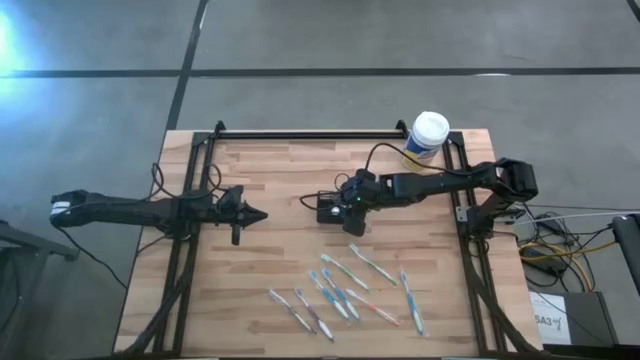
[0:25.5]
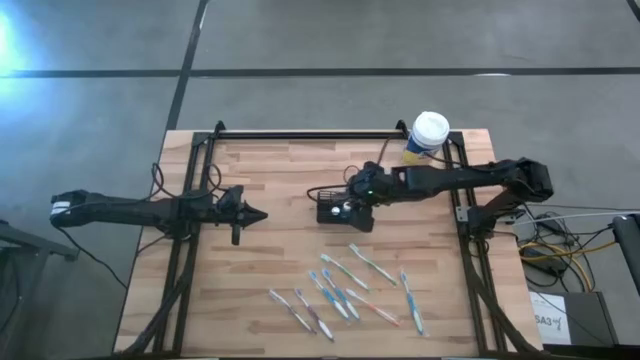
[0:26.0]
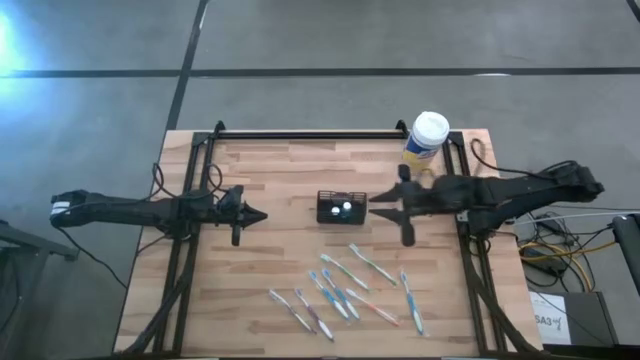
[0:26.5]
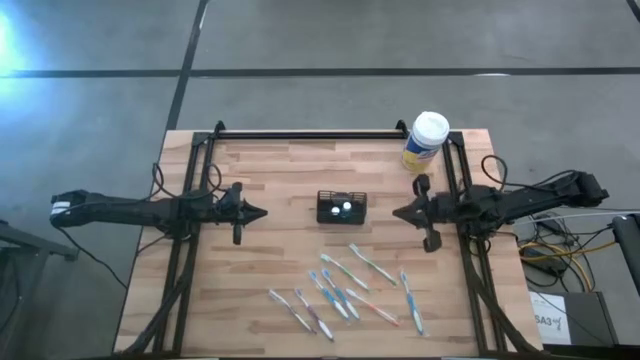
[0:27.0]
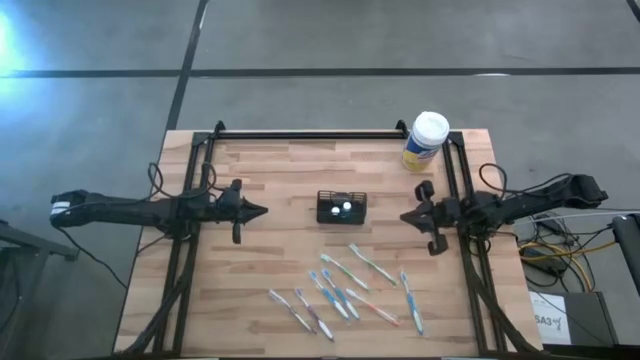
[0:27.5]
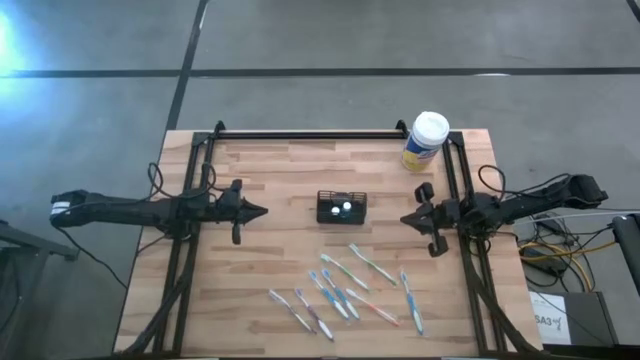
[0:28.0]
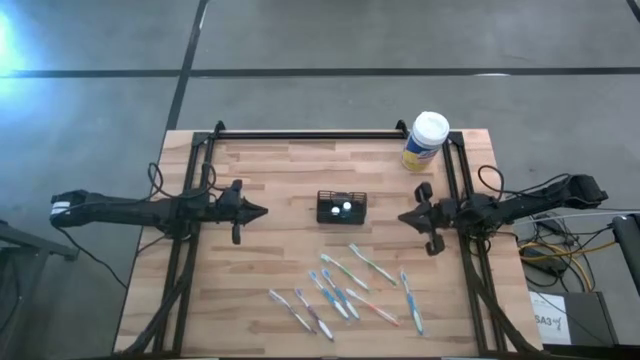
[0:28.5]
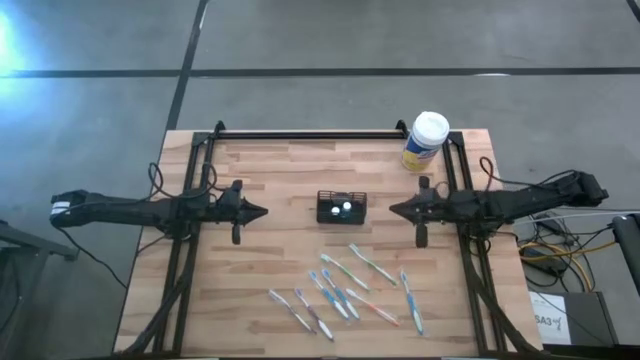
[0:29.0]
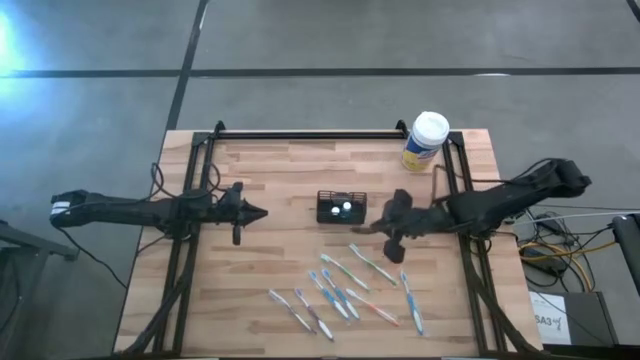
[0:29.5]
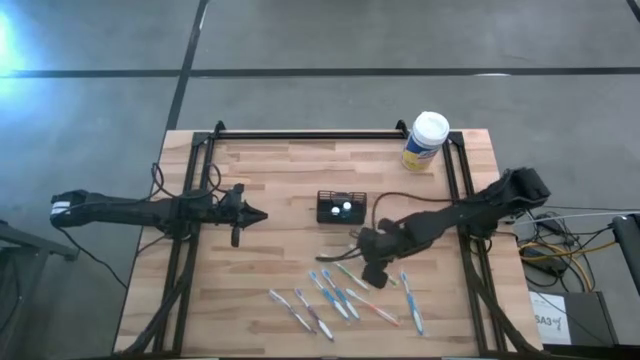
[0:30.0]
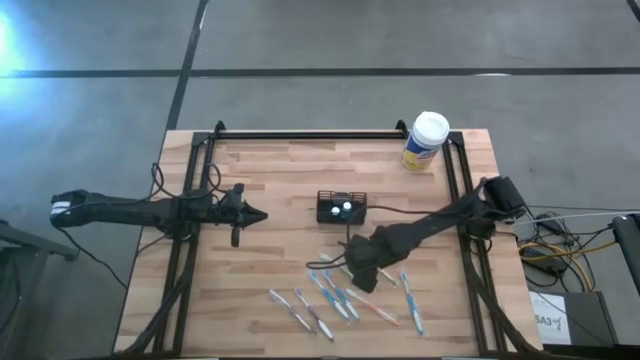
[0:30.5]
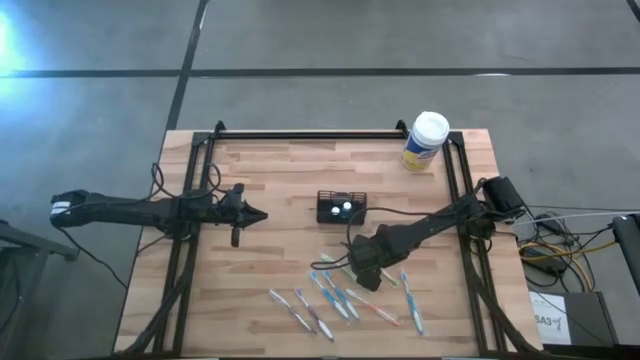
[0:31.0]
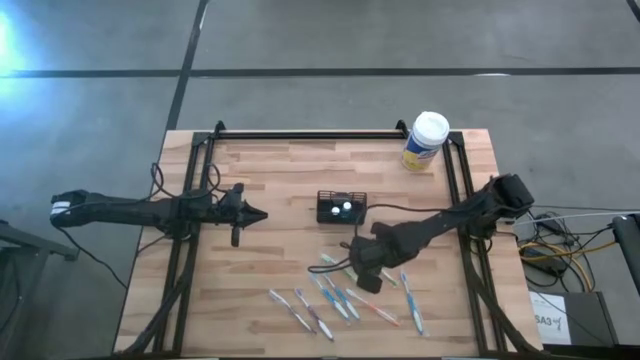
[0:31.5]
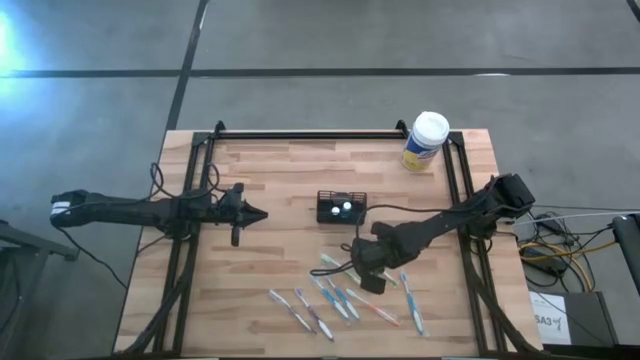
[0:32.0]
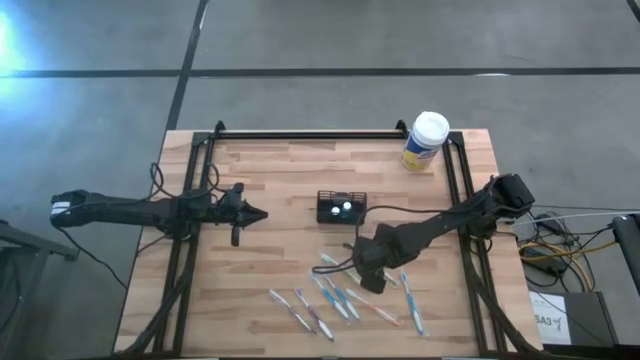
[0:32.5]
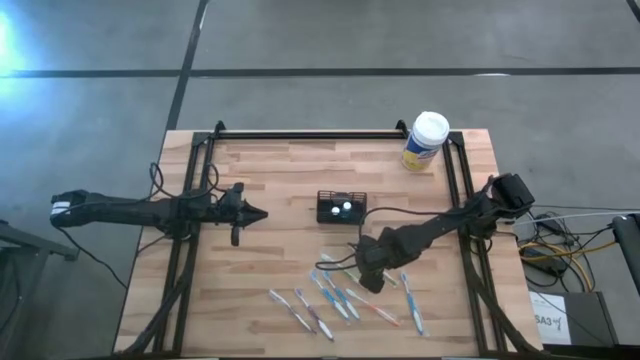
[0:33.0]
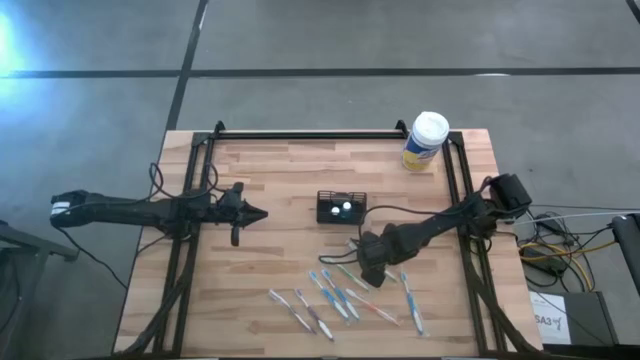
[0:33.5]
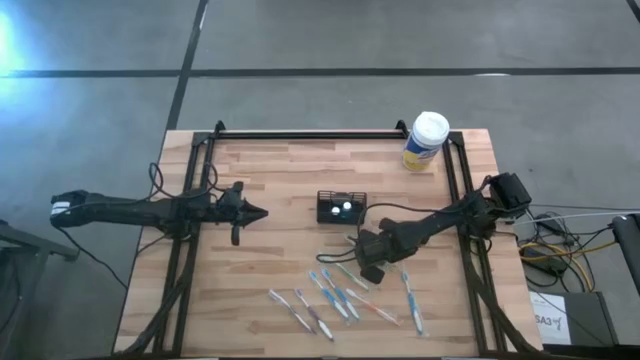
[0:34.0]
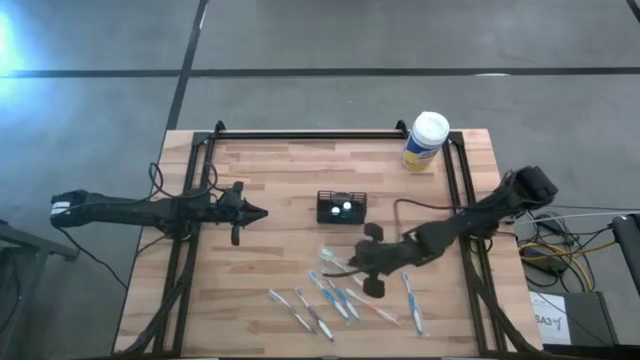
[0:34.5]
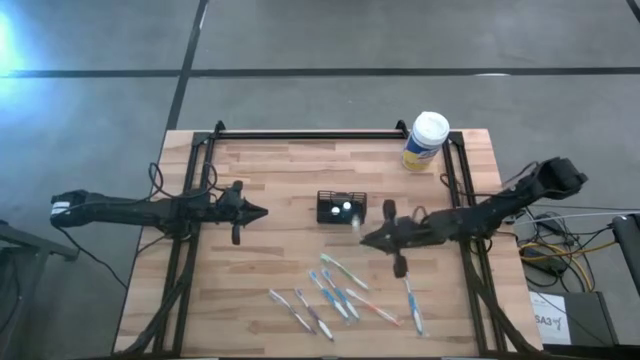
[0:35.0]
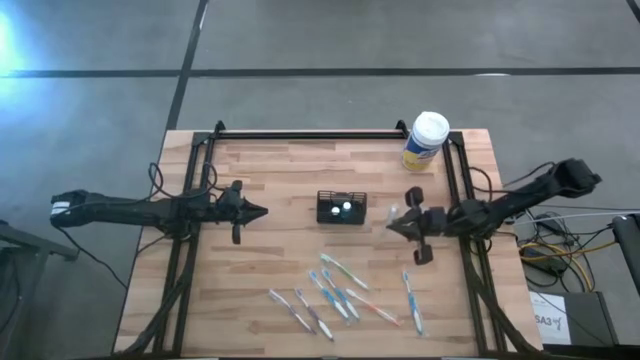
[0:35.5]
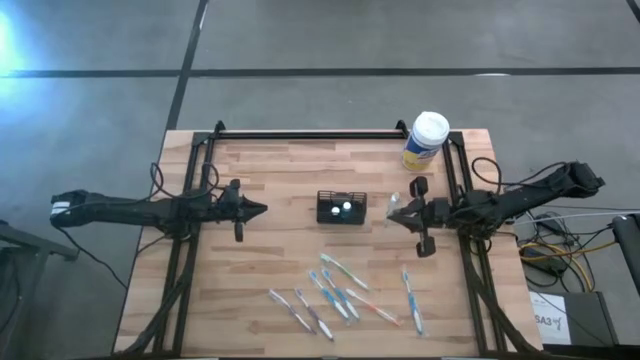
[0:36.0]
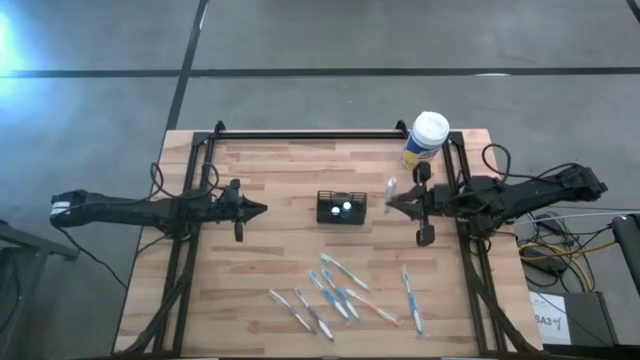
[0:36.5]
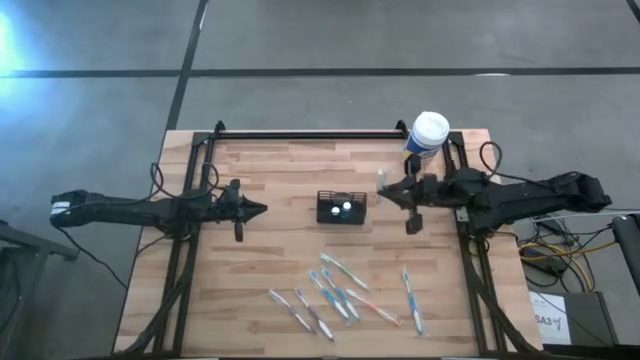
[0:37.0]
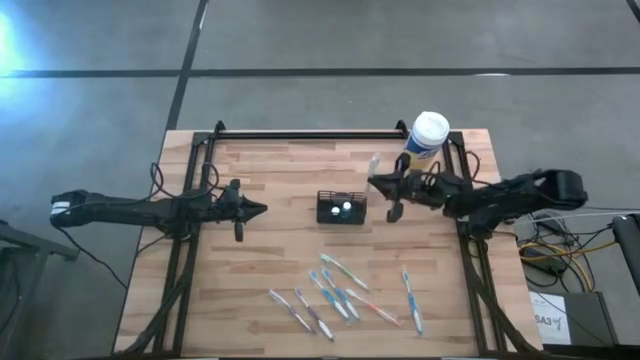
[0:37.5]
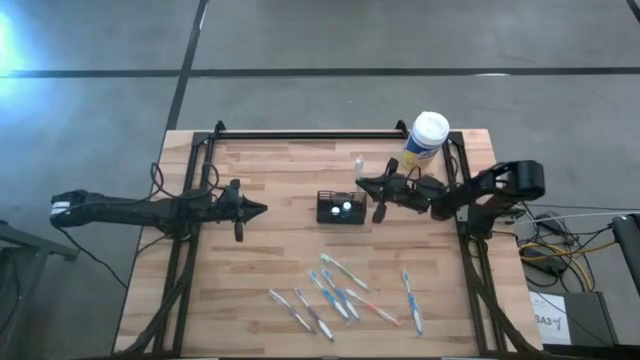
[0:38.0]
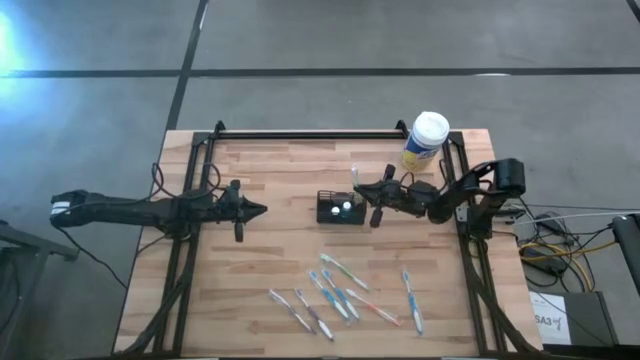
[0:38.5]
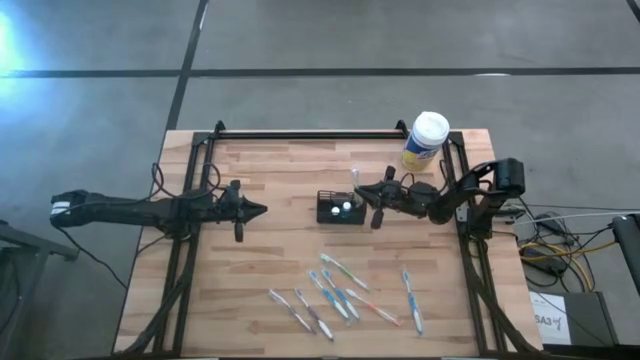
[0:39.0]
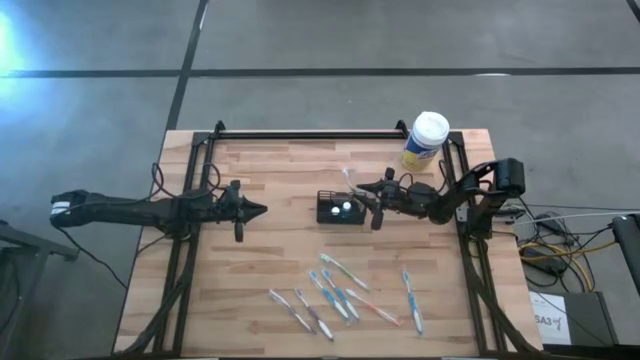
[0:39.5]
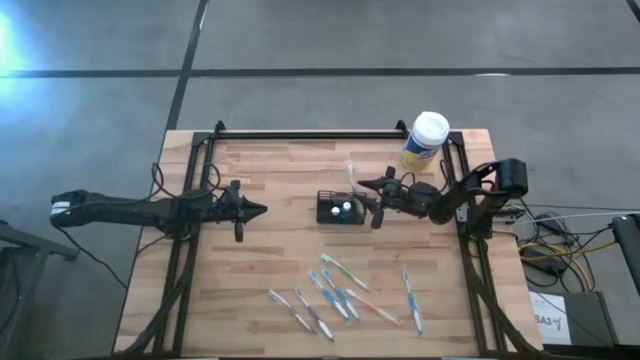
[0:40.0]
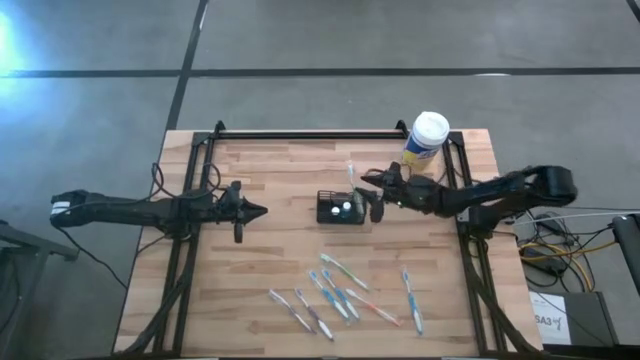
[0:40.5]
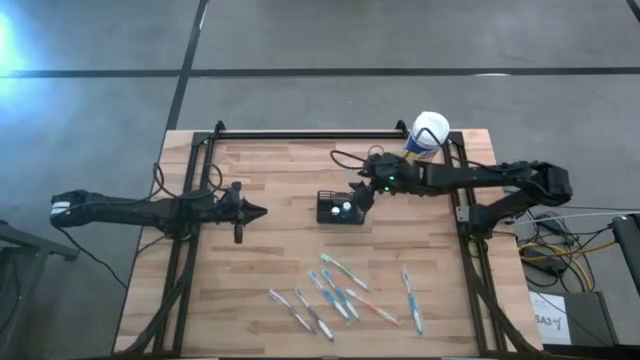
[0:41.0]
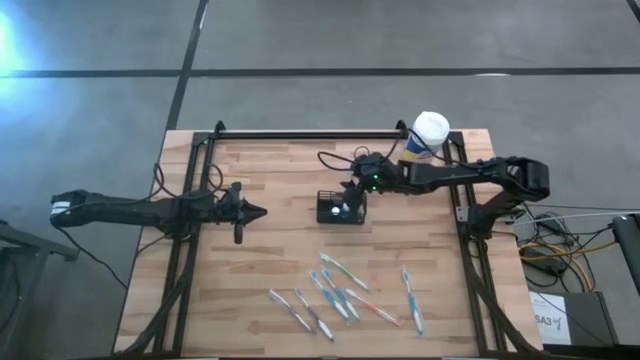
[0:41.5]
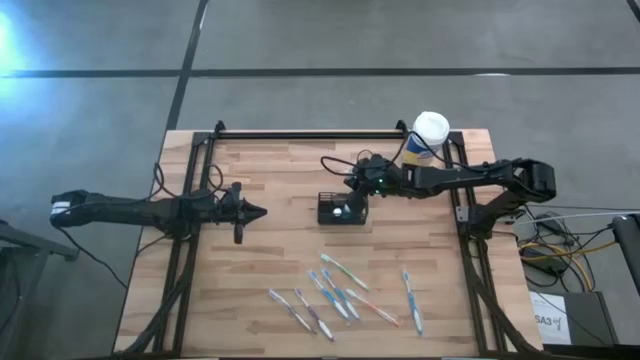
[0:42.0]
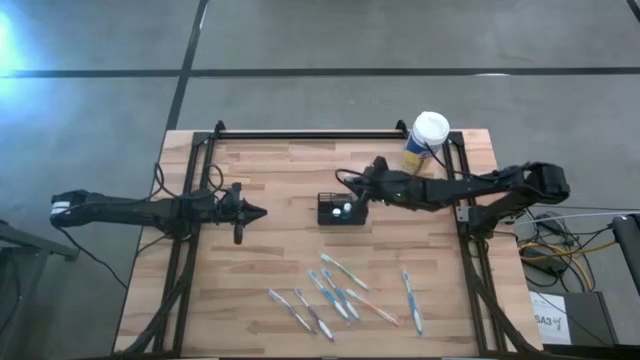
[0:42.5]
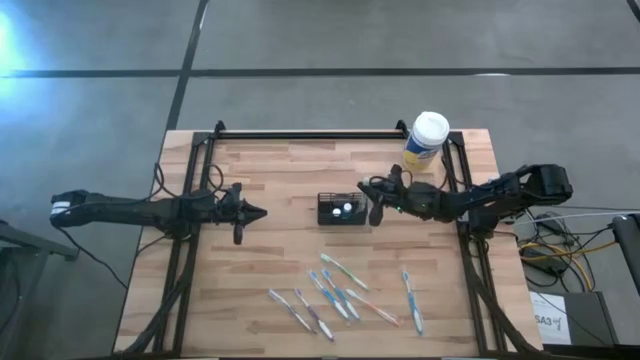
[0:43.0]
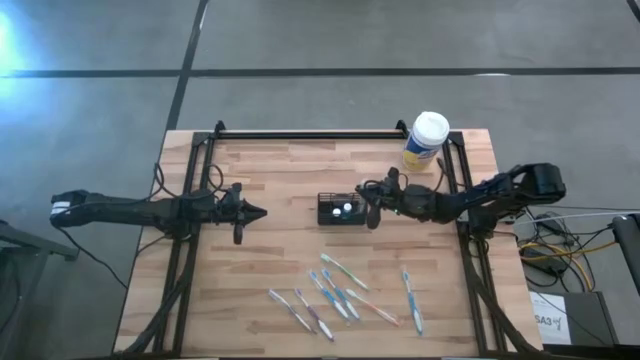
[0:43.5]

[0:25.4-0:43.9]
Task: Pick & Place toothbrushing station
Put the right green toothbrush into the wire organizer

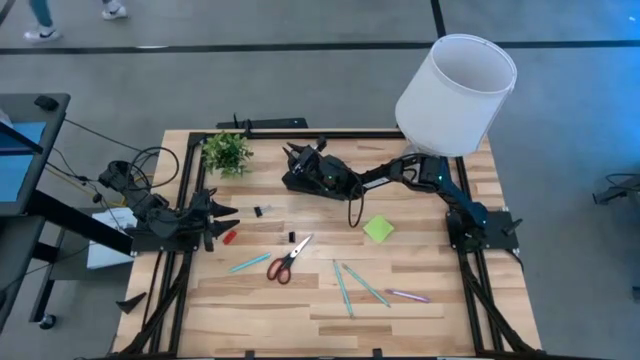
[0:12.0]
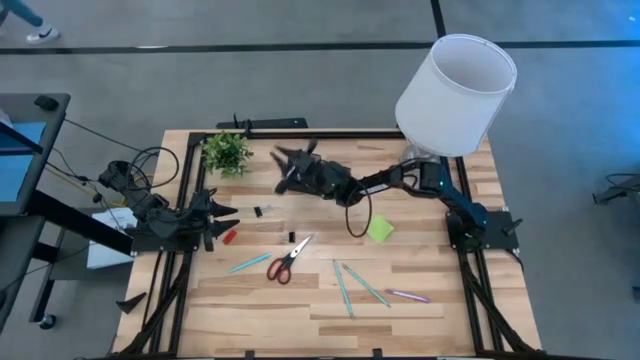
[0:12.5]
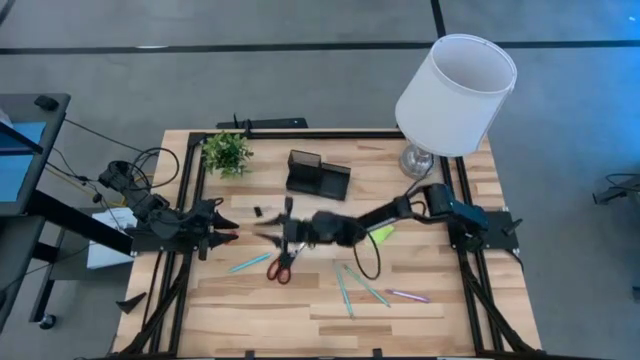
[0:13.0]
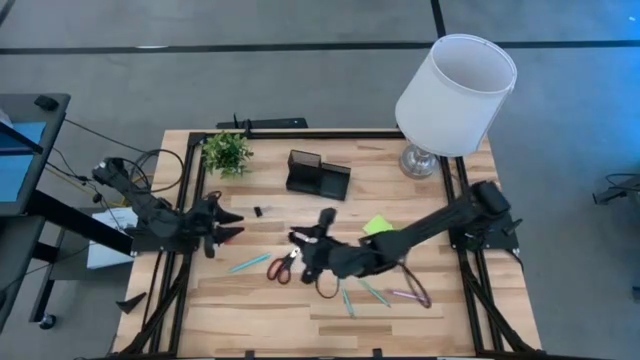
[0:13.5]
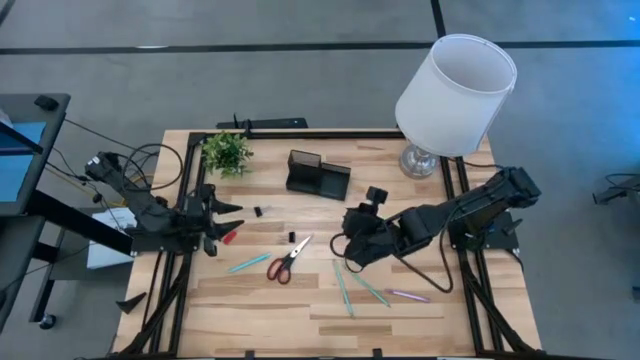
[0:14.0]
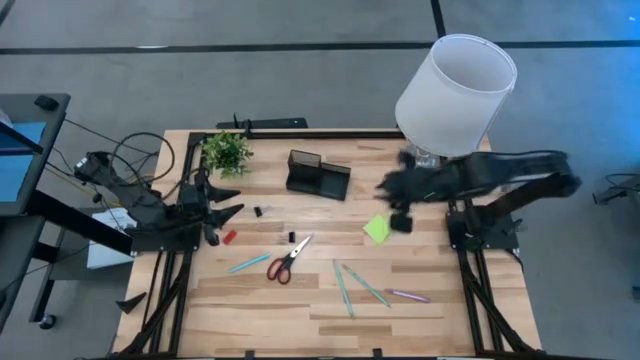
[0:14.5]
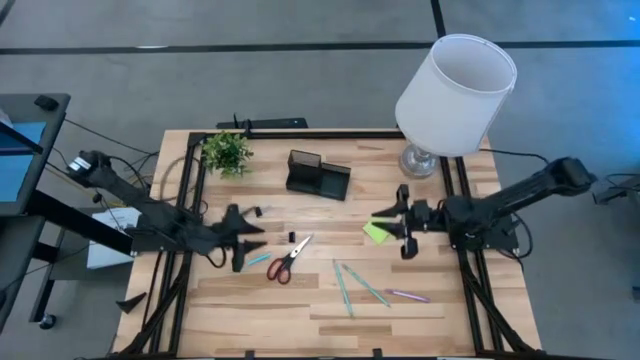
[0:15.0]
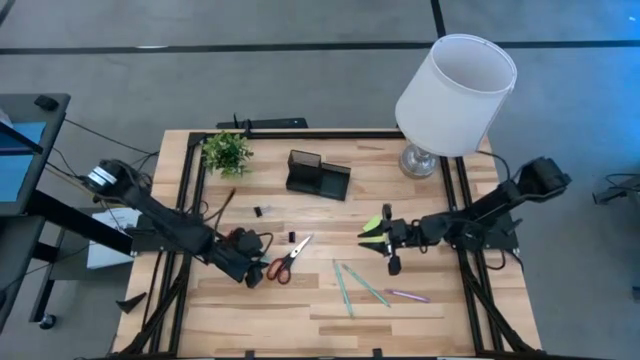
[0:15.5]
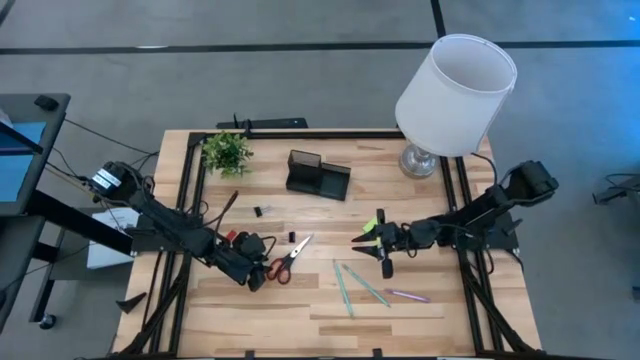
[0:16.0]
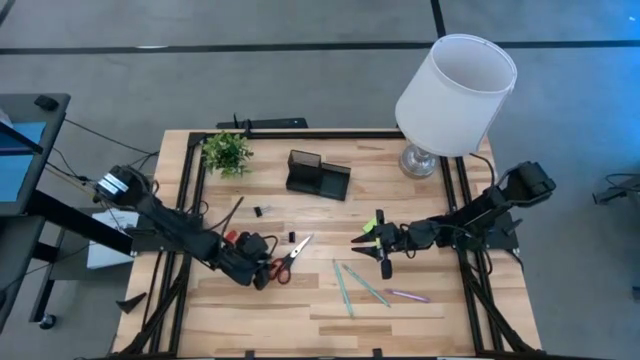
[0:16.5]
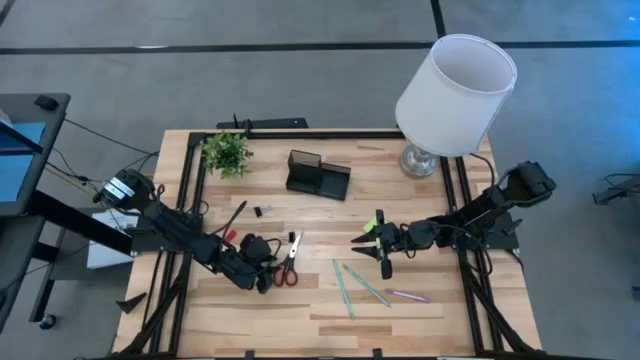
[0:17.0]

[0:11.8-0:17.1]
Task: Pick and place office supplies into organizer
Put the black scissor into the desk organizer
